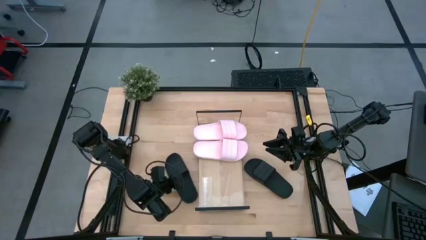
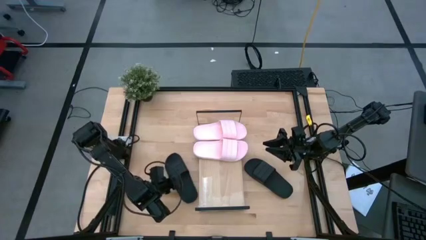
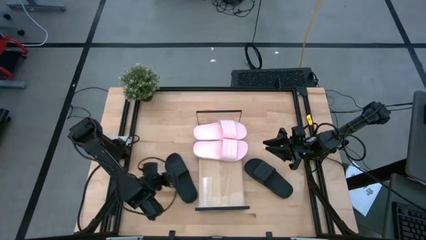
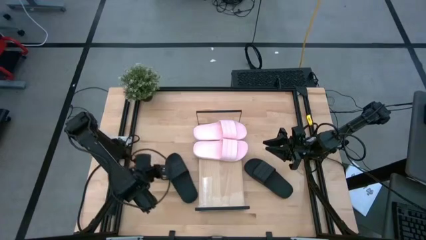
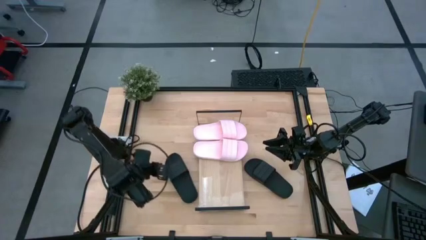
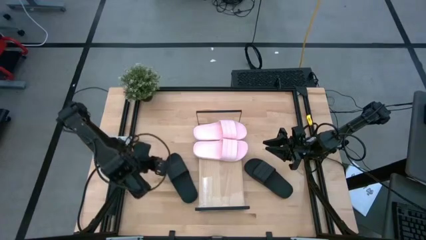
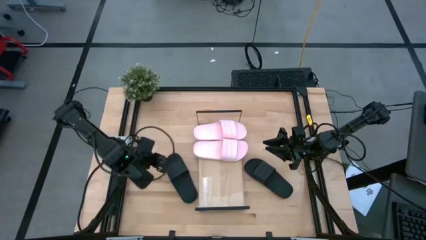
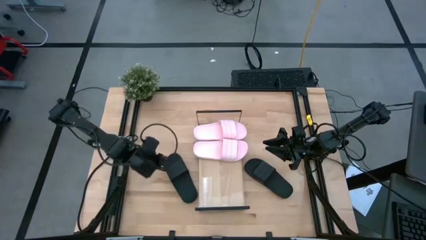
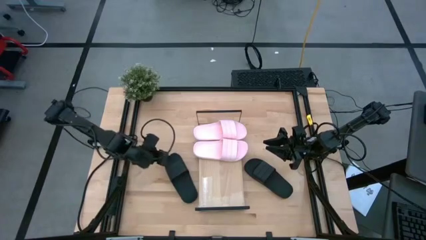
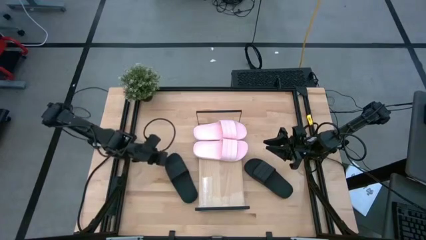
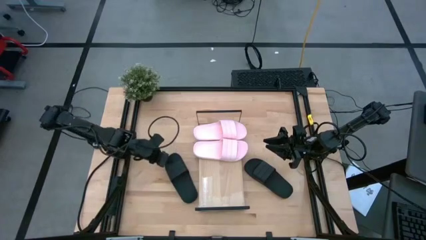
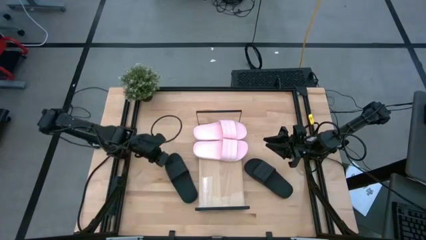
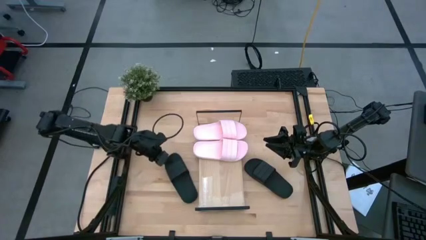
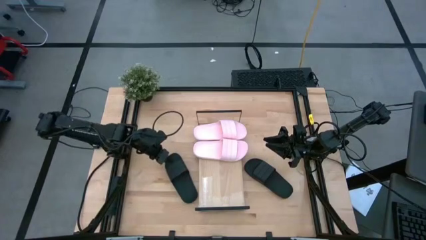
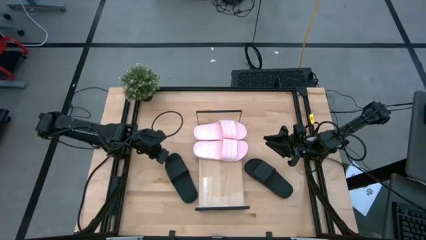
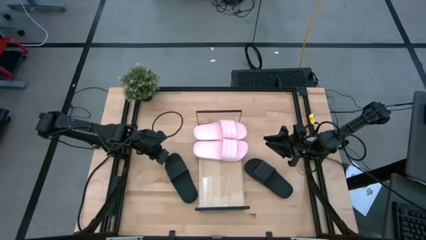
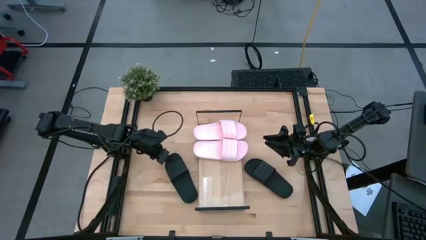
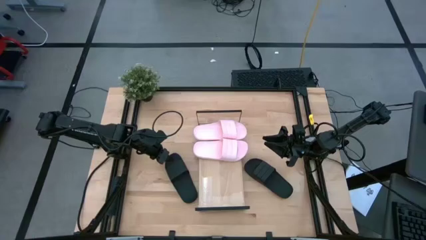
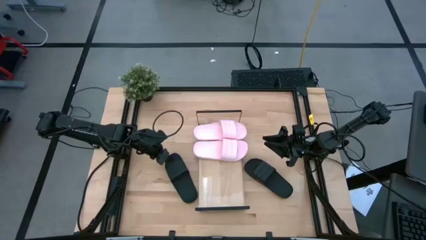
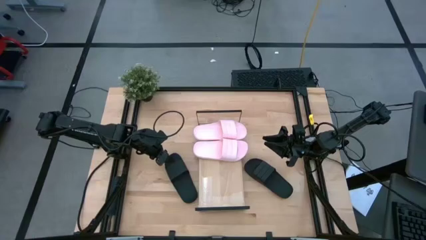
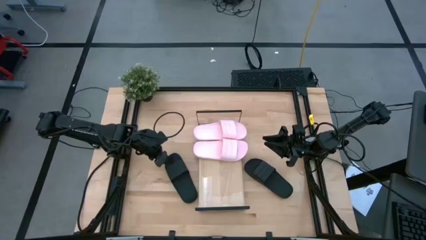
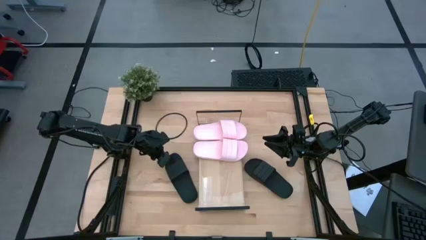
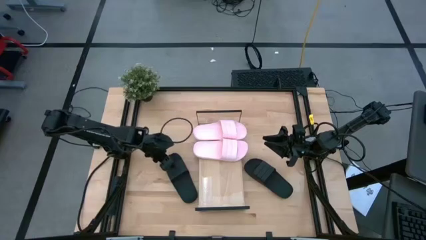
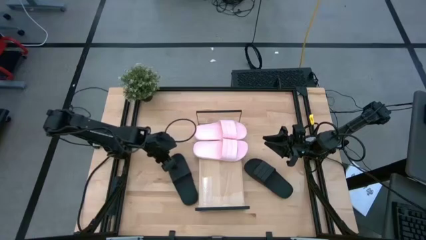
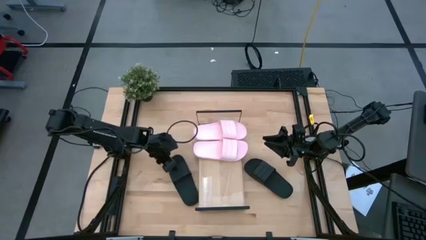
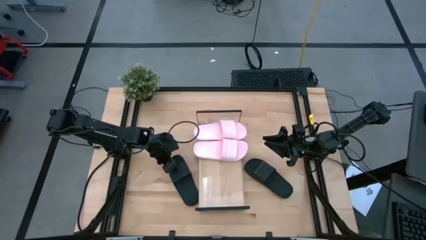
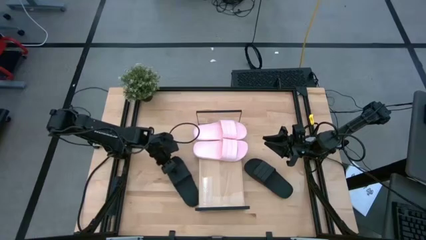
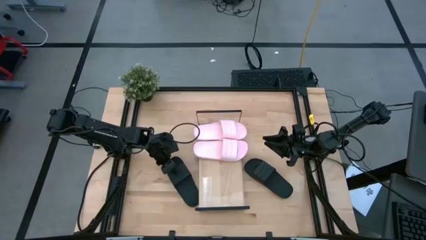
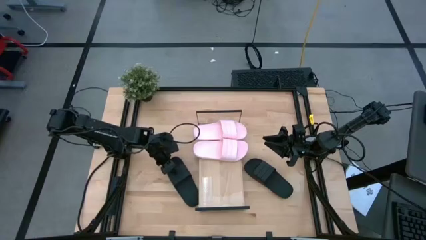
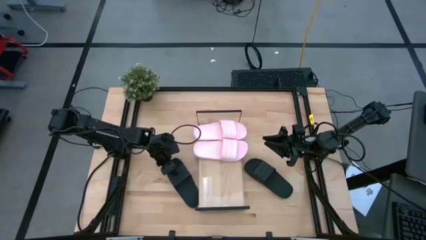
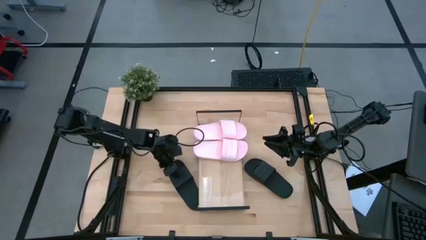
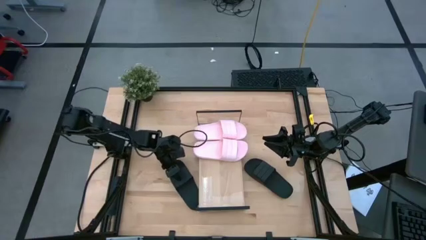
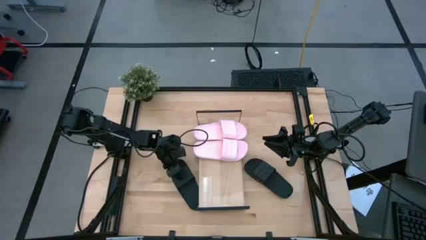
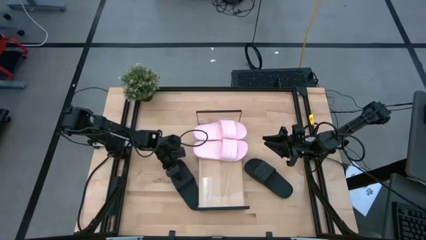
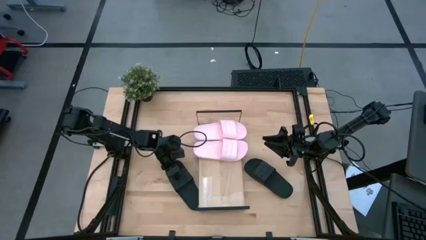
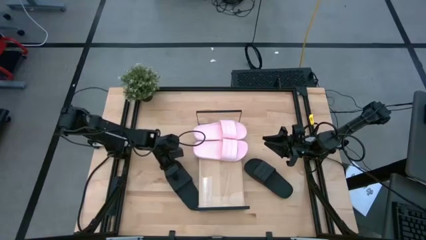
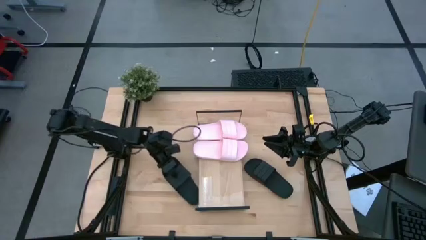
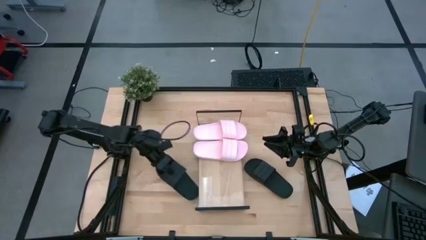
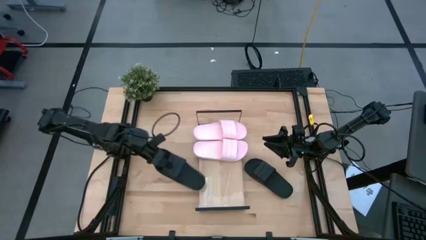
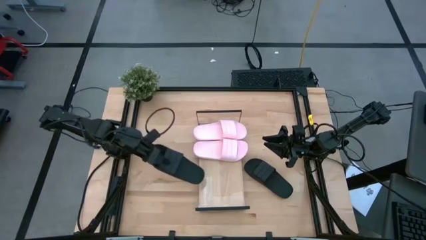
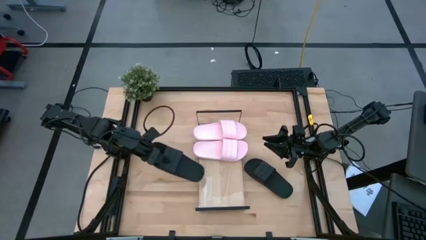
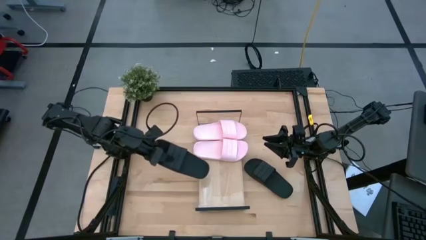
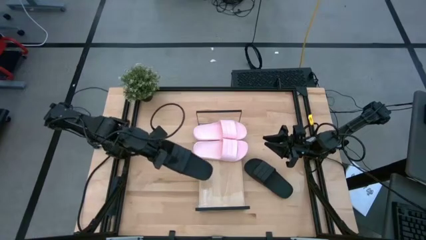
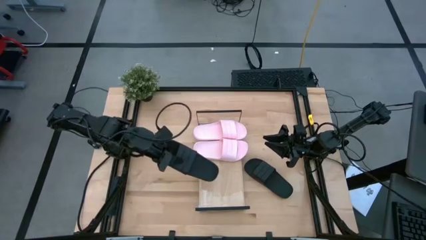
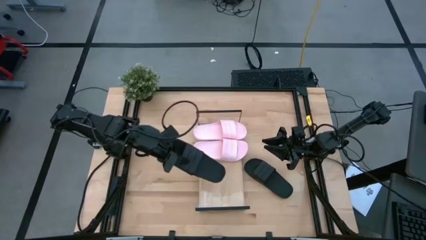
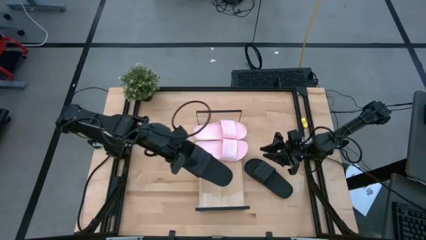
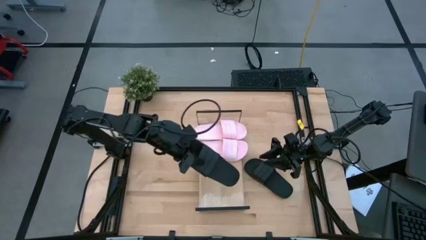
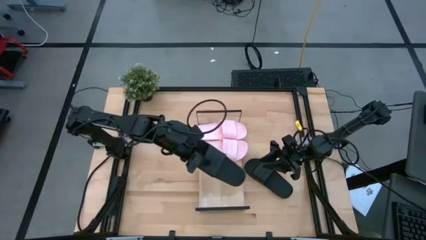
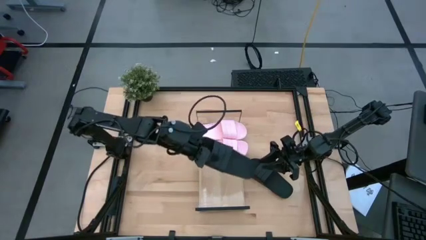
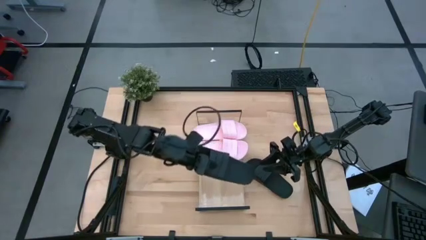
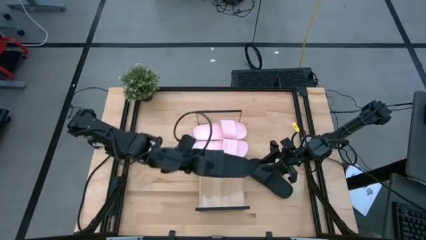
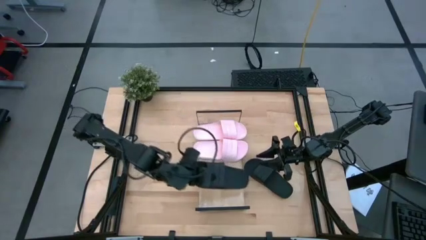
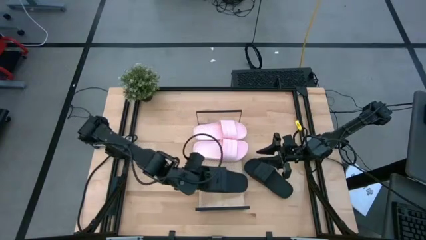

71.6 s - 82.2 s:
Task: Pick and place slides into the shelf
Put the left black slide on the shelf

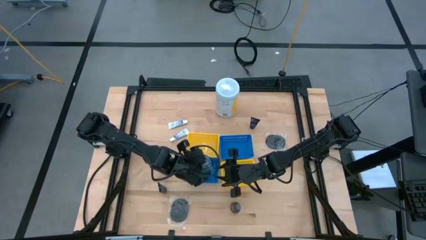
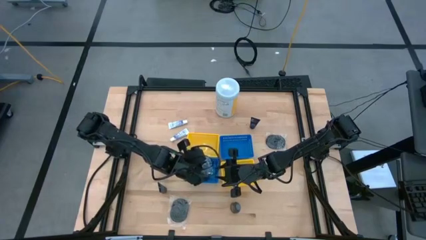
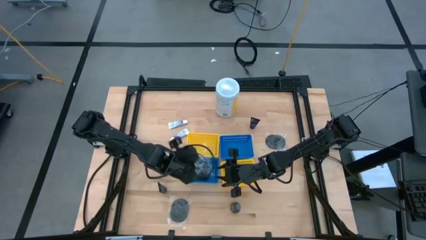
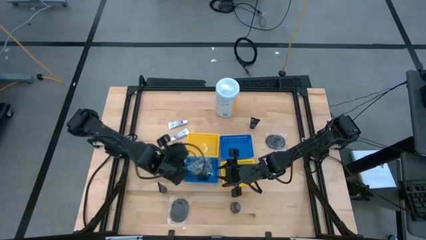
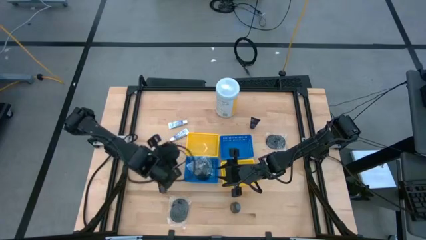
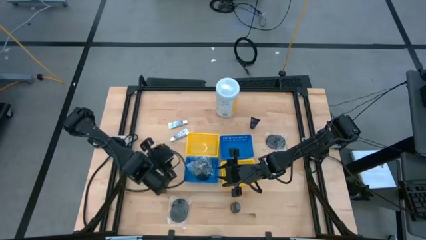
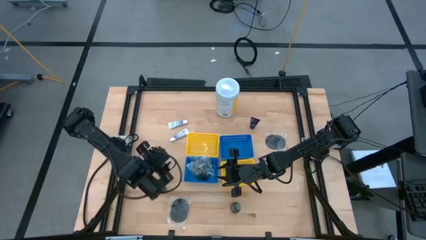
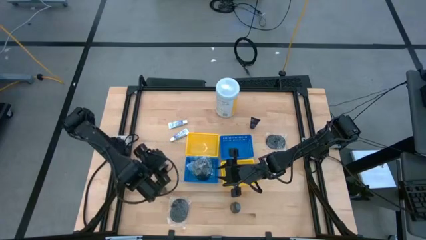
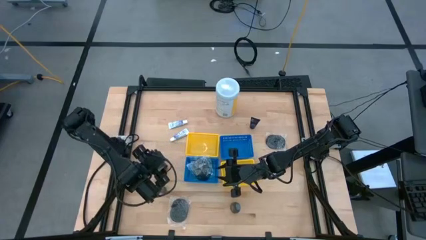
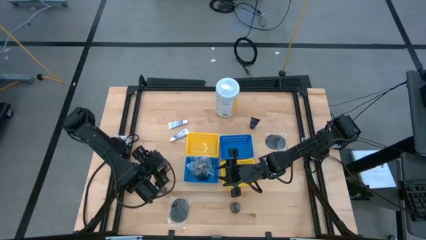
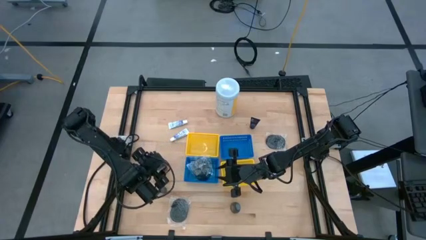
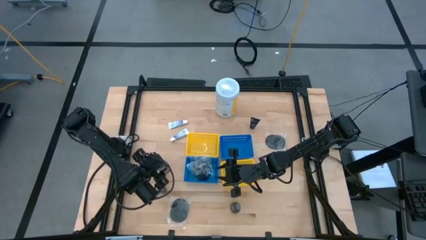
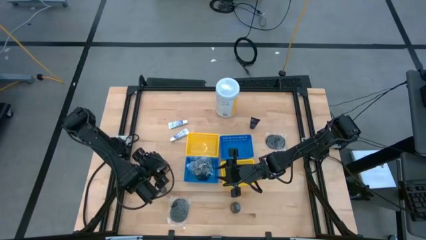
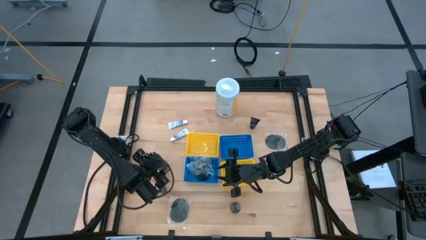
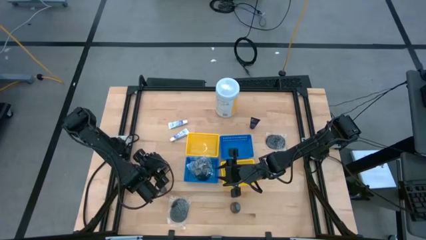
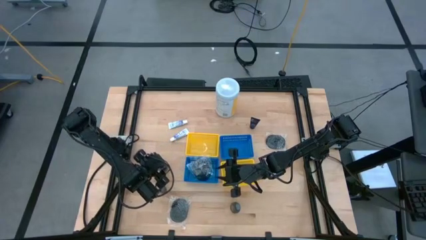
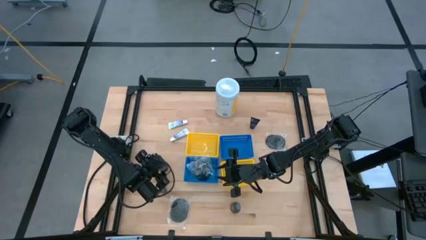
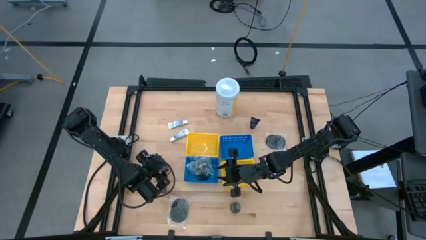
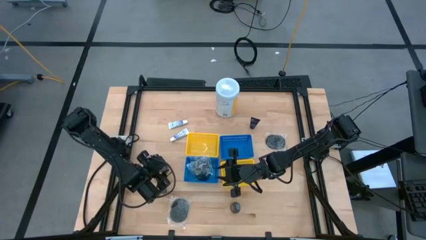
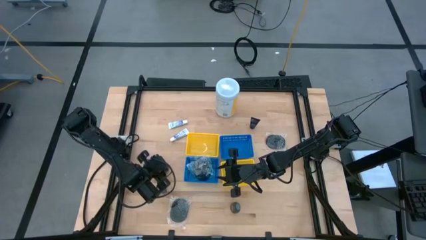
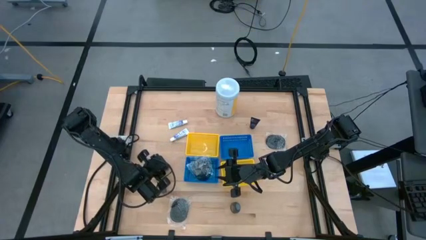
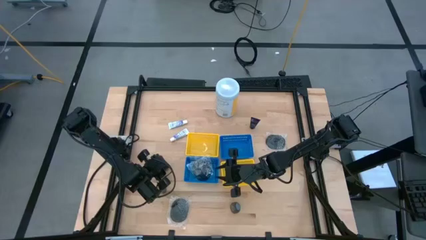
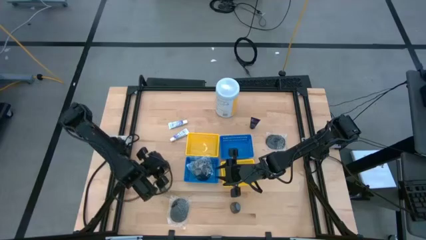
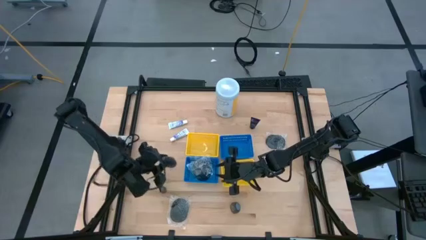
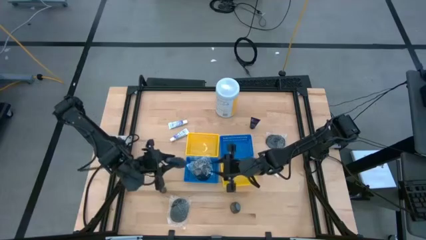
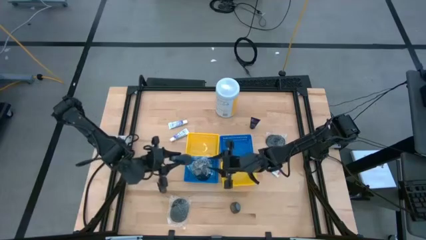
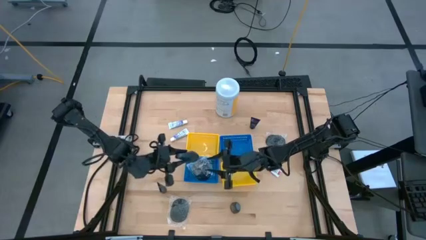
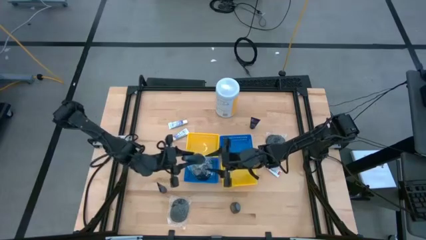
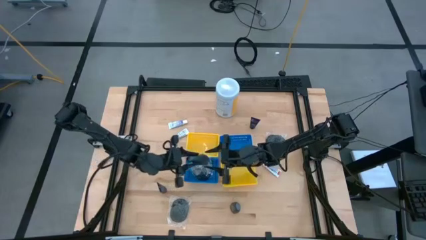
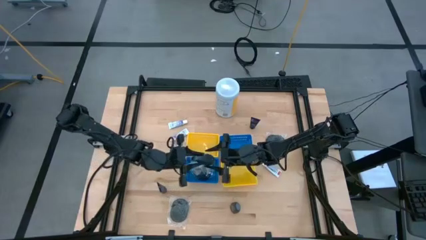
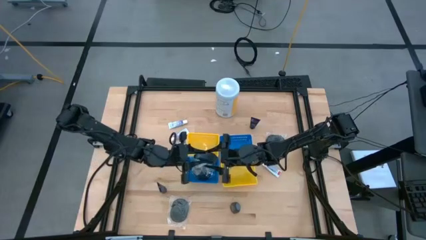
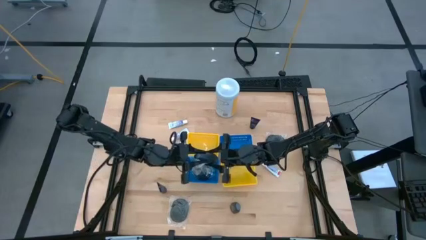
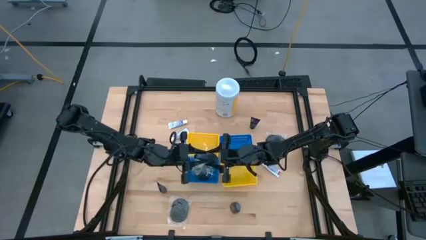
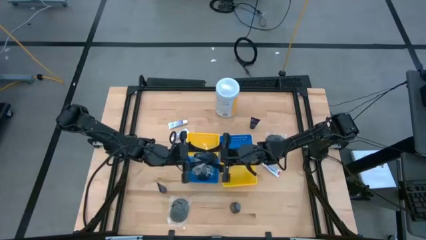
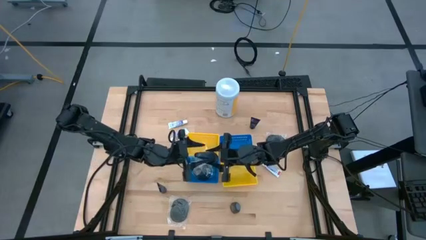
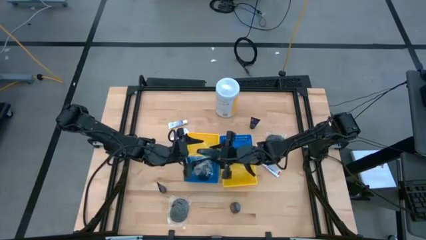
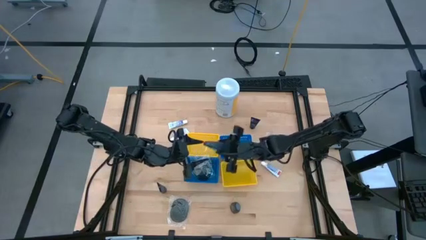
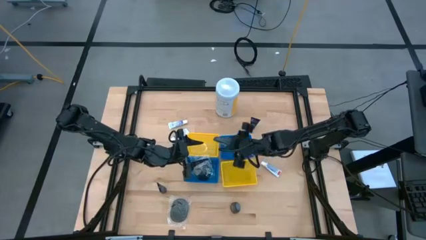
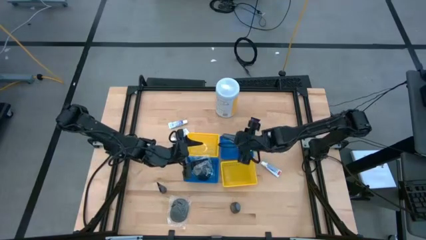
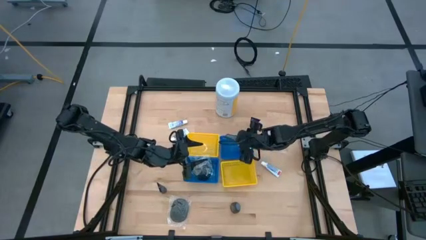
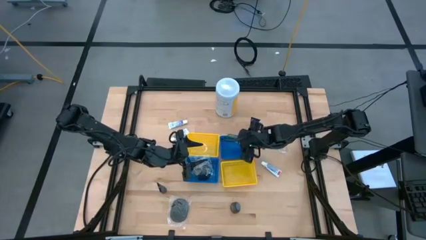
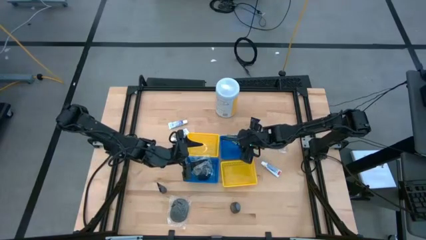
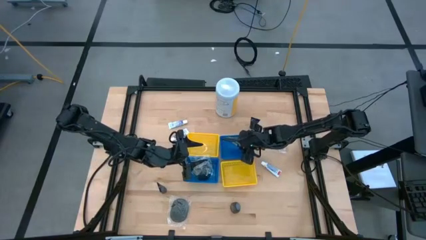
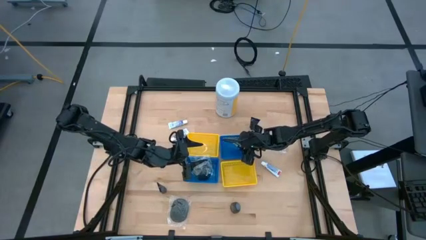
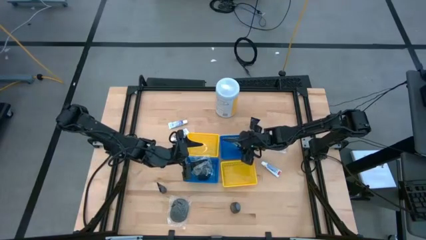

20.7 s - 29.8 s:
Task: Pick & Place Travel size toiletries
Put the gray deodorant into the top blue bin
